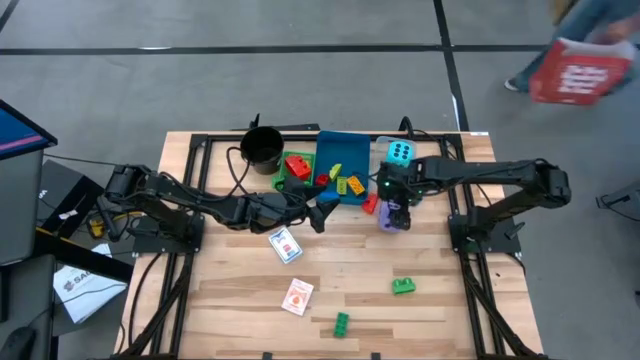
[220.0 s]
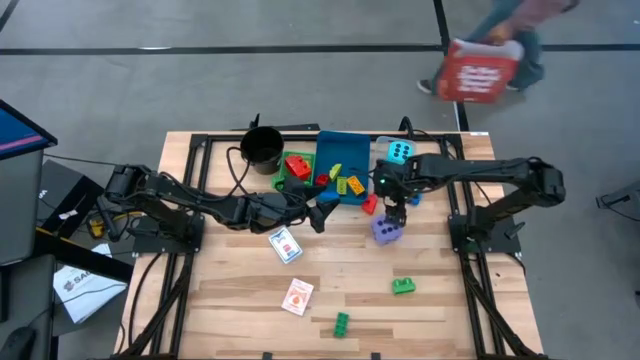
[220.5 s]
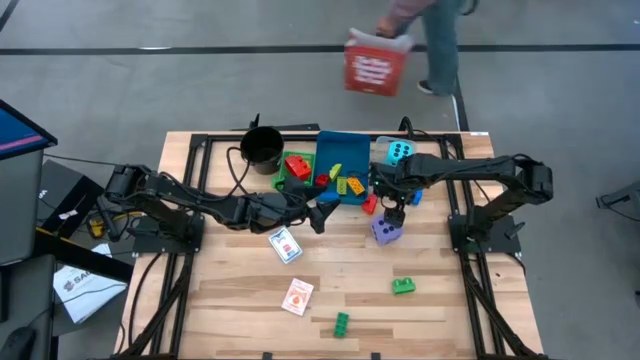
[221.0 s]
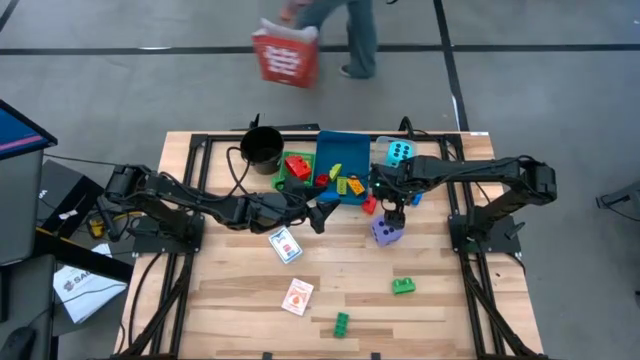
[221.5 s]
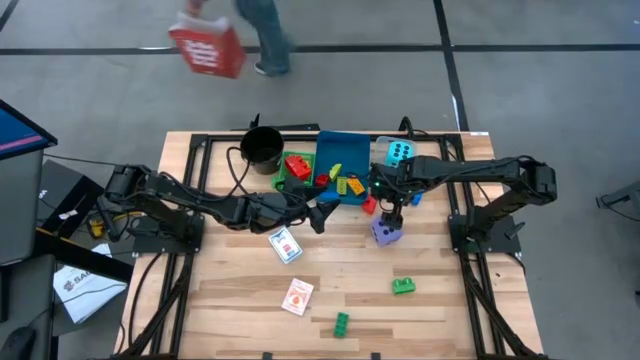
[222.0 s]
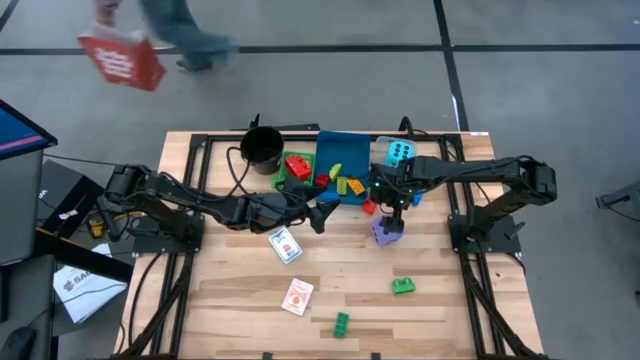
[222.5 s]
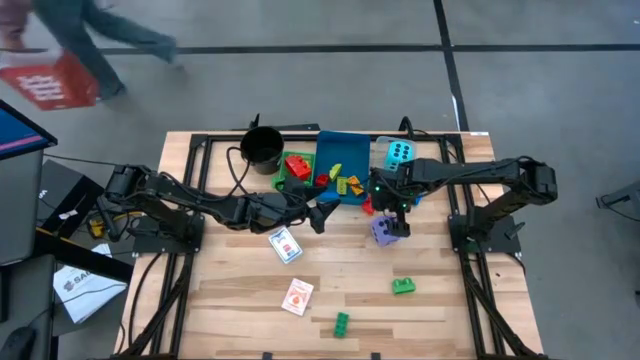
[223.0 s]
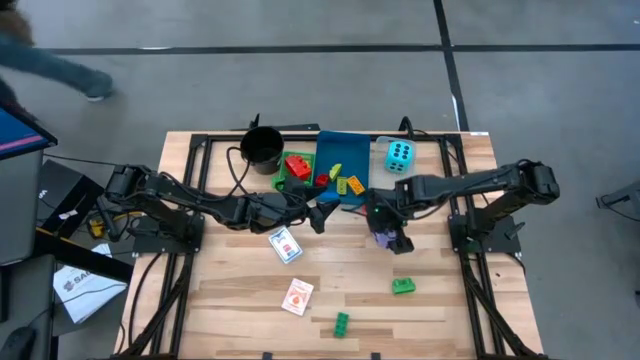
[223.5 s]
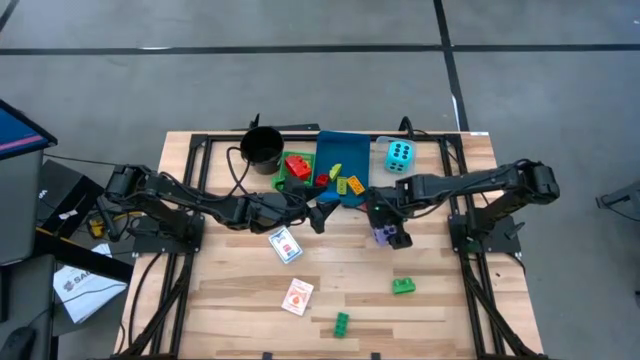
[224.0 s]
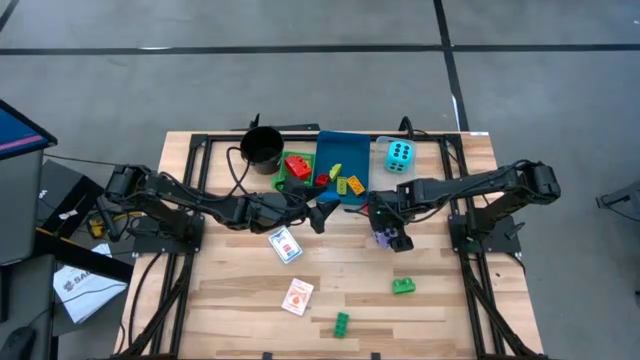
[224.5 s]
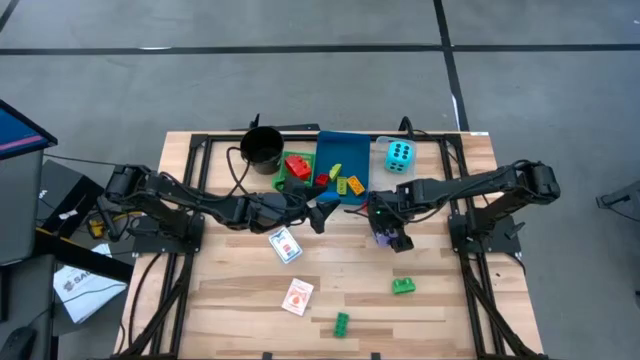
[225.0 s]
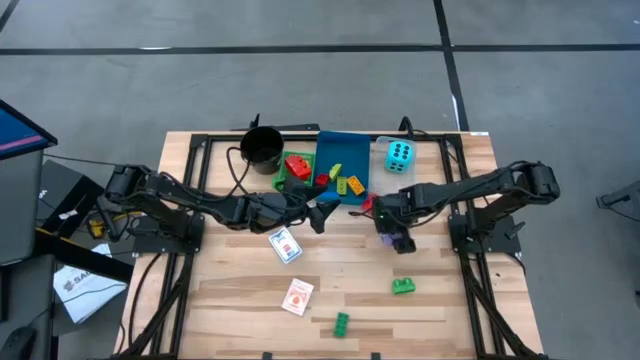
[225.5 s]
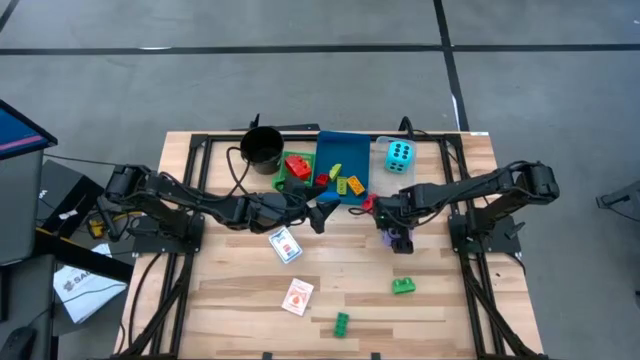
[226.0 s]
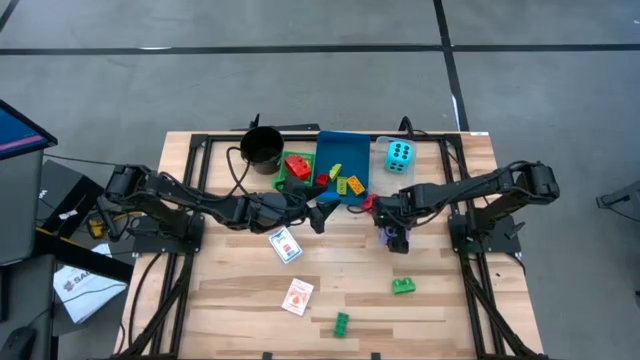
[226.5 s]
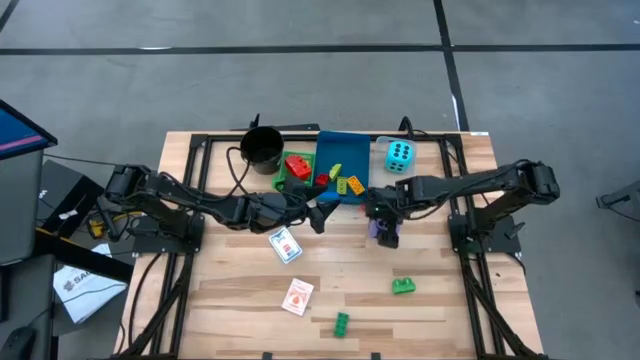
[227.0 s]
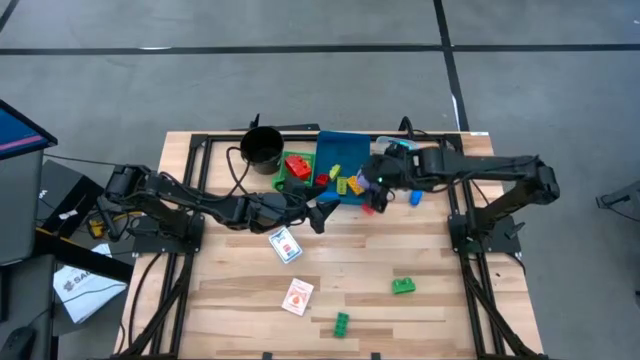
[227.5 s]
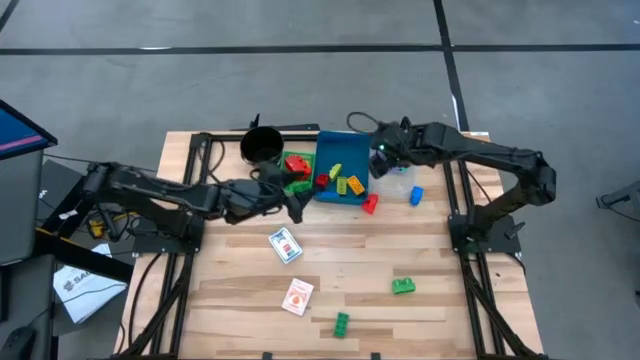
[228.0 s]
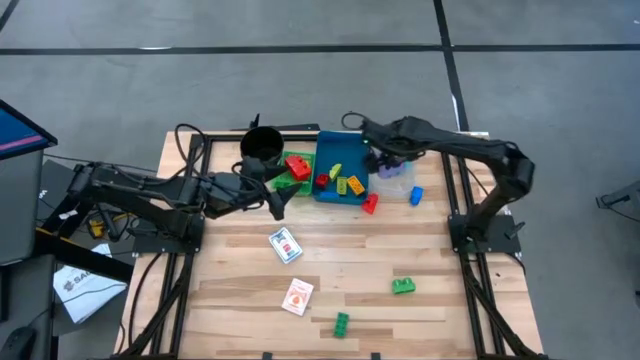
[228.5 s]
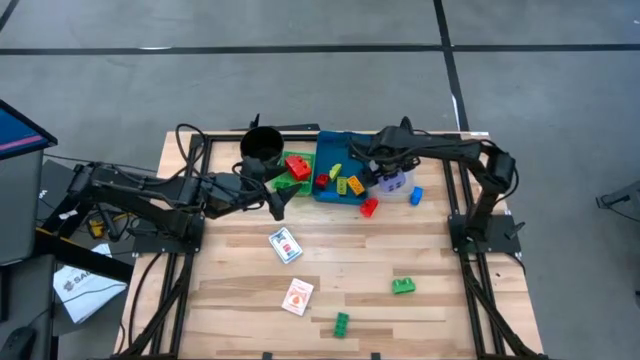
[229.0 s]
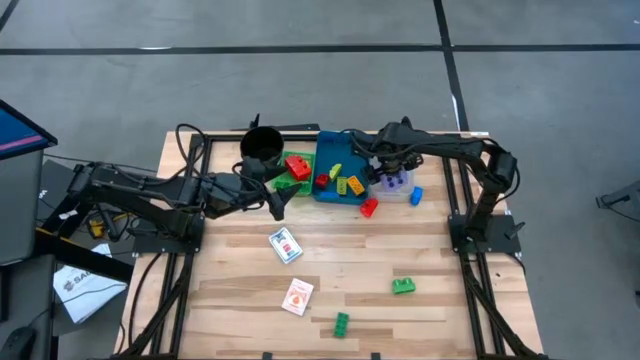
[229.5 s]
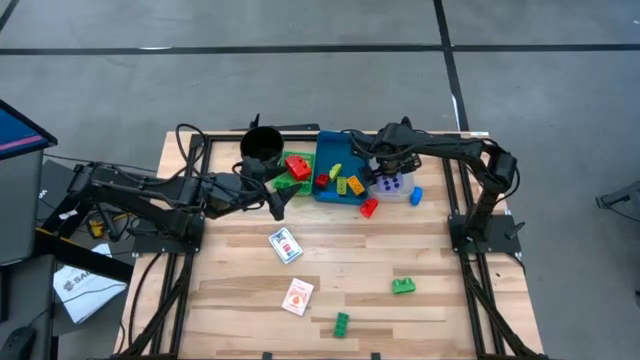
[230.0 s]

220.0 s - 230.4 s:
Task: Pick & Place Toys
Put the purple dice into the transparent bin

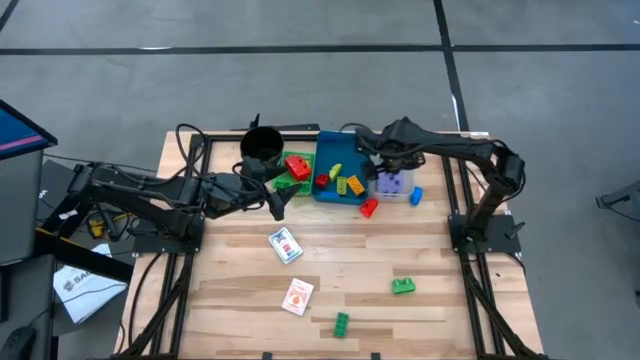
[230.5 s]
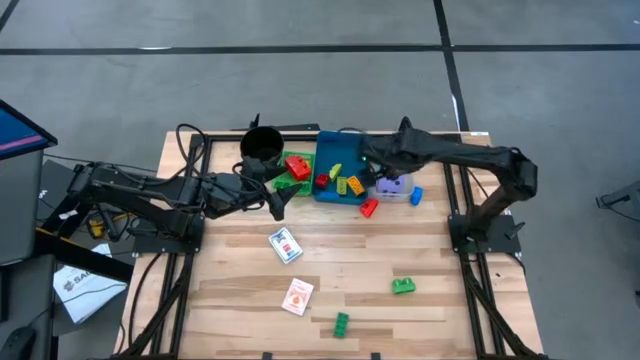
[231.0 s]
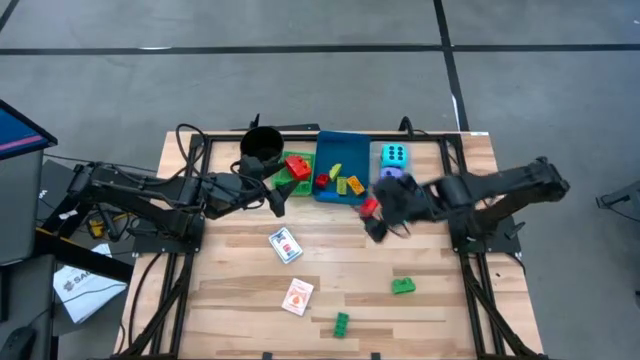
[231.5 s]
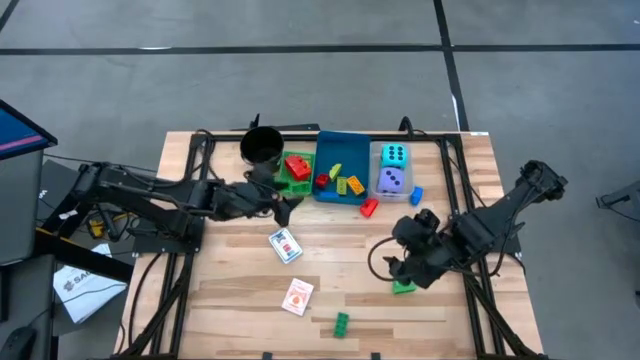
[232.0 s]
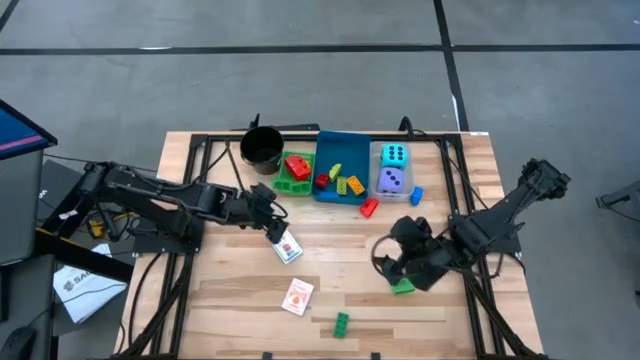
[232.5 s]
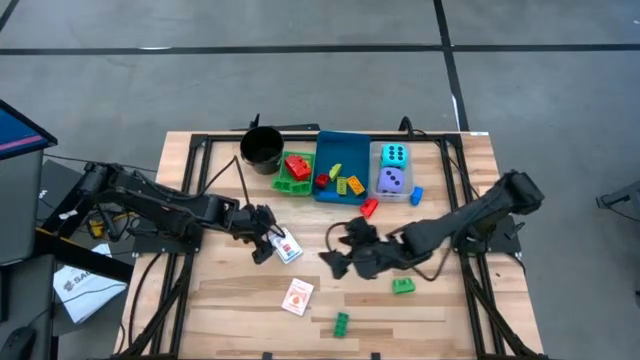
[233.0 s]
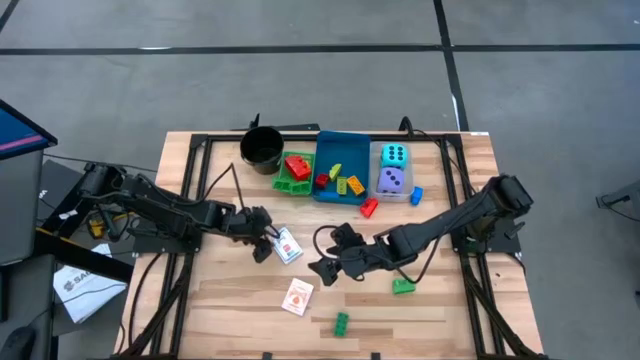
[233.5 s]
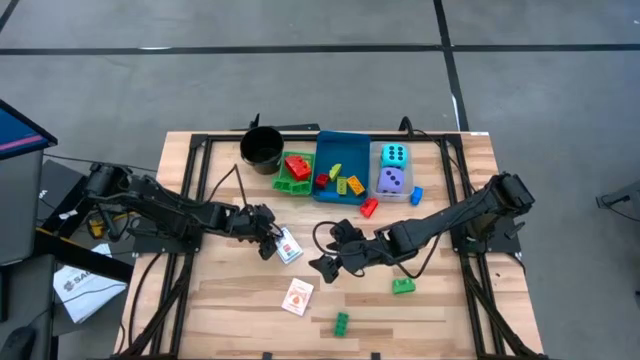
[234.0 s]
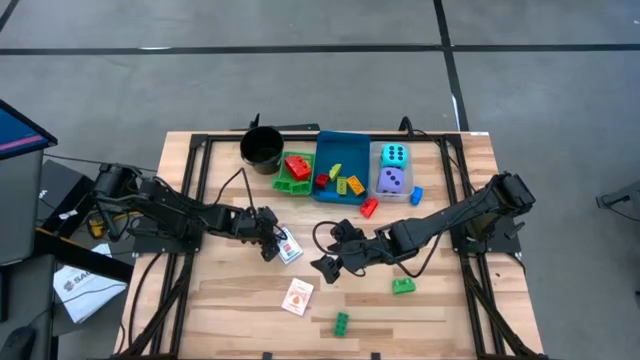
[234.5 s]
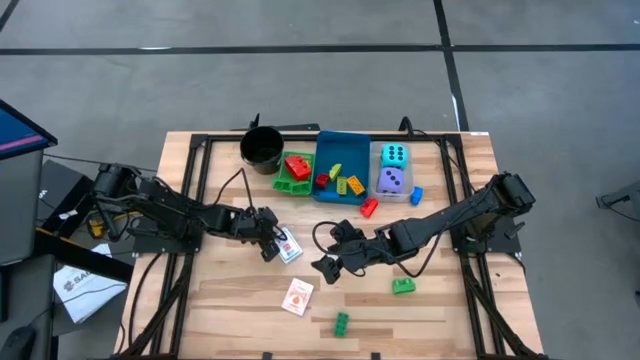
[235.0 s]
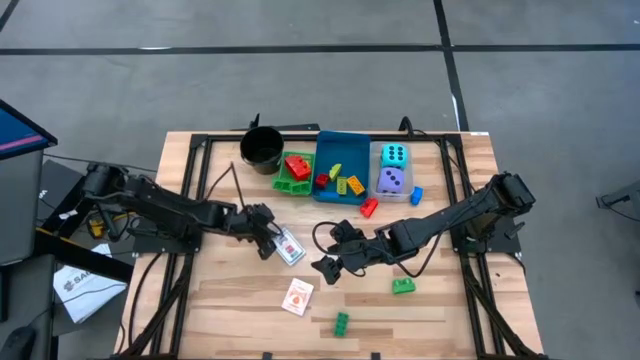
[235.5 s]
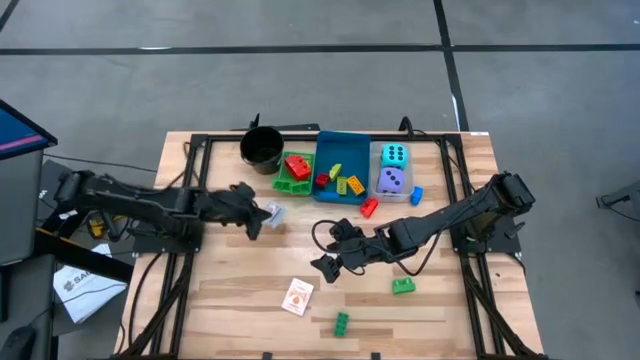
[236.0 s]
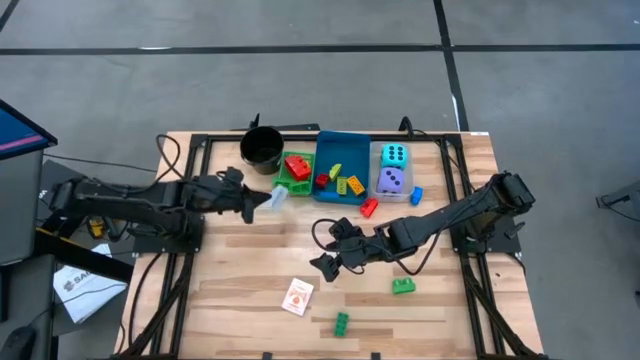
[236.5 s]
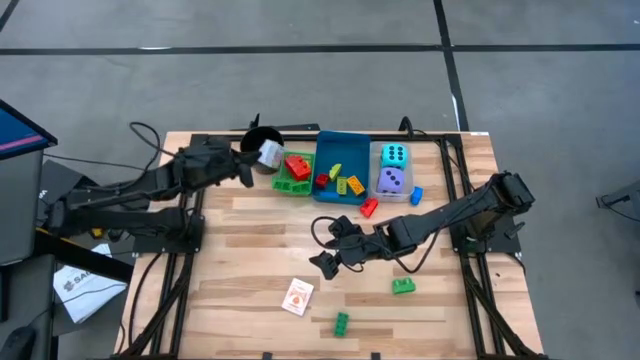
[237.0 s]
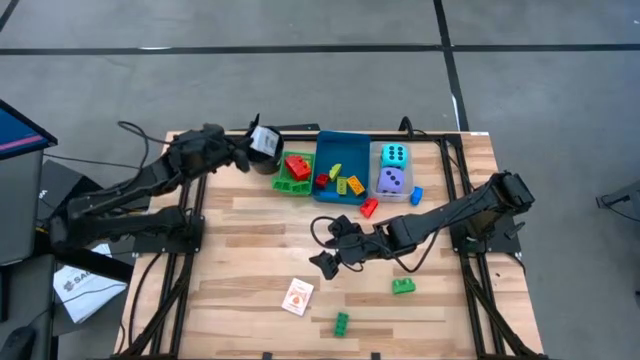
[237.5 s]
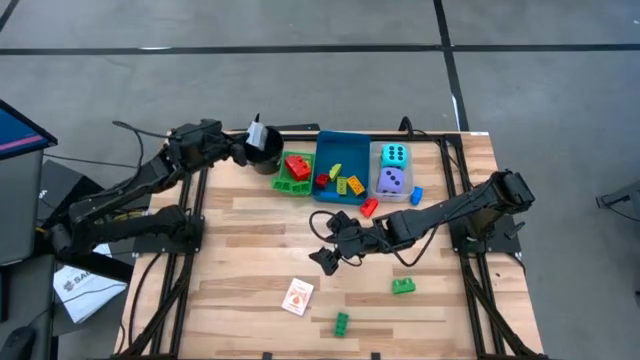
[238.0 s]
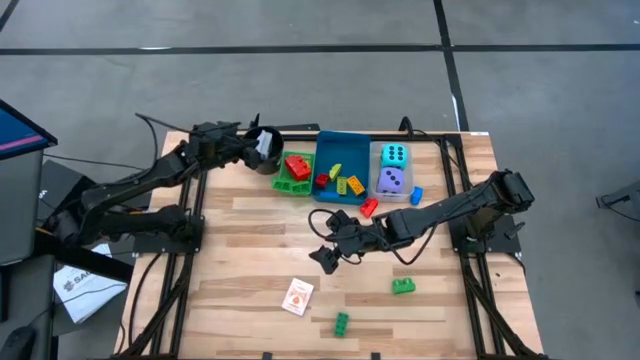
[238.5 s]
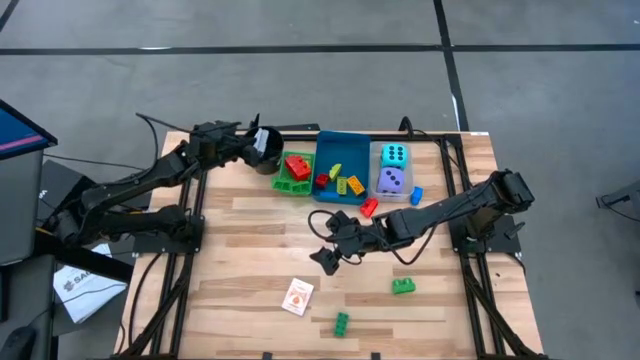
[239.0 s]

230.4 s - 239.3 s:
Put the blue deck of cards into the black bucket
